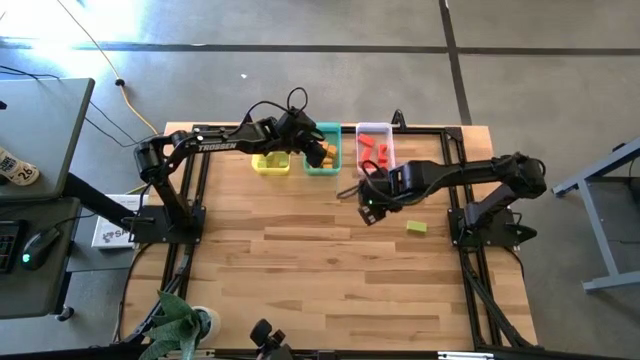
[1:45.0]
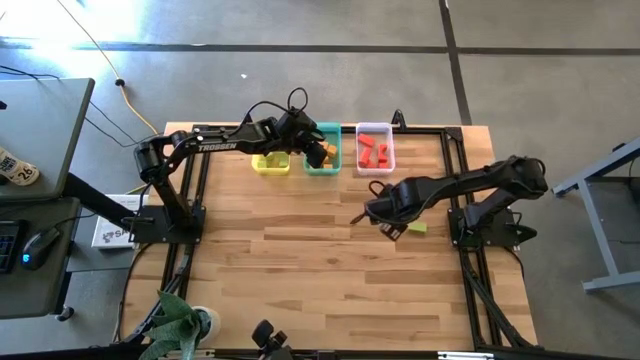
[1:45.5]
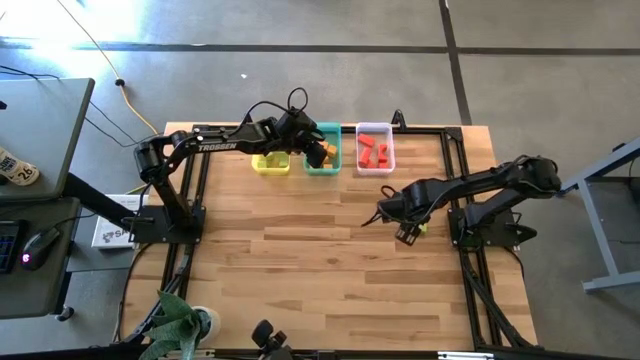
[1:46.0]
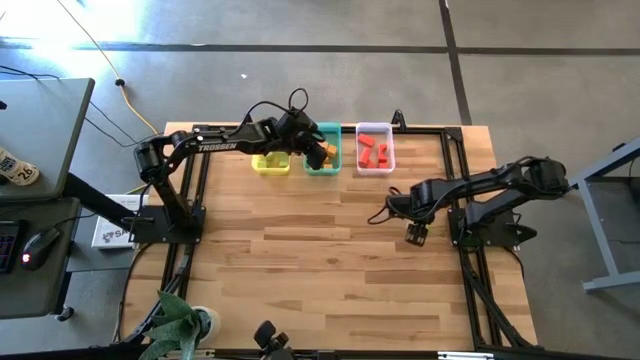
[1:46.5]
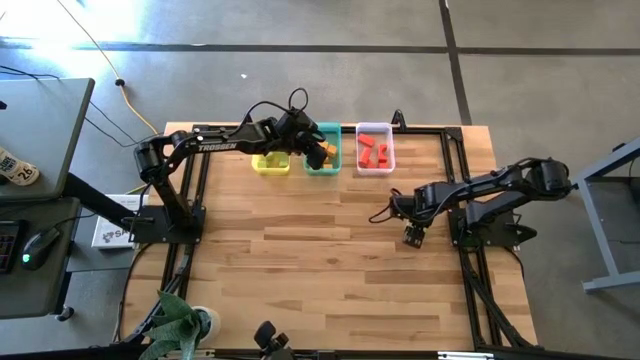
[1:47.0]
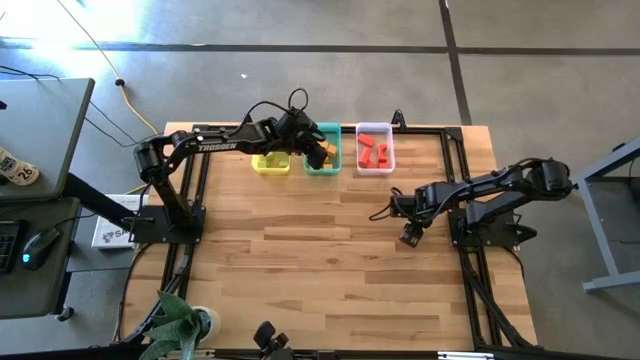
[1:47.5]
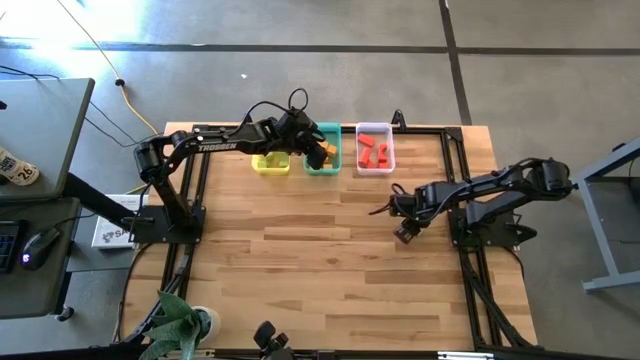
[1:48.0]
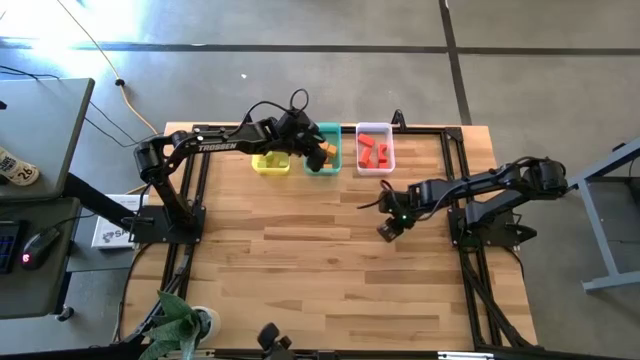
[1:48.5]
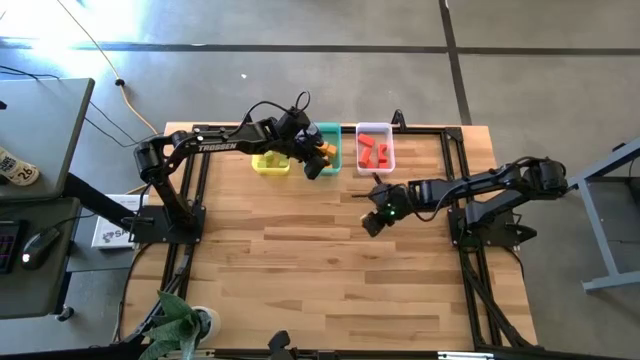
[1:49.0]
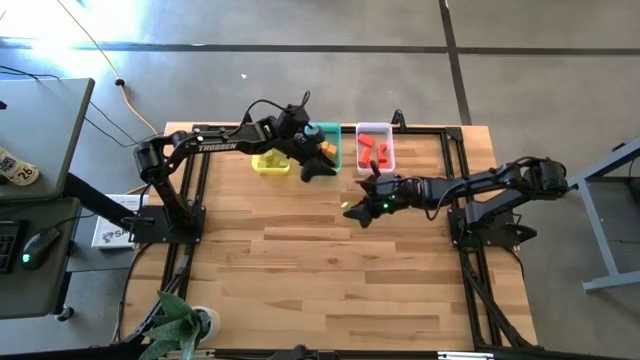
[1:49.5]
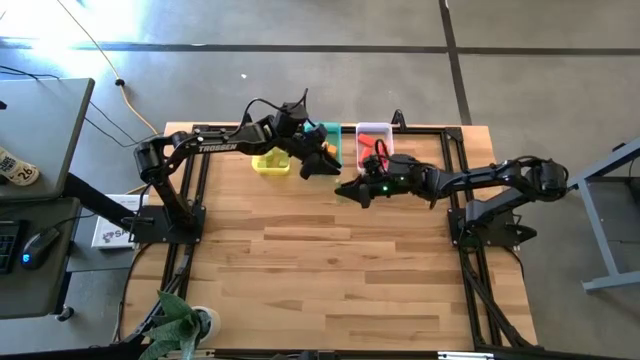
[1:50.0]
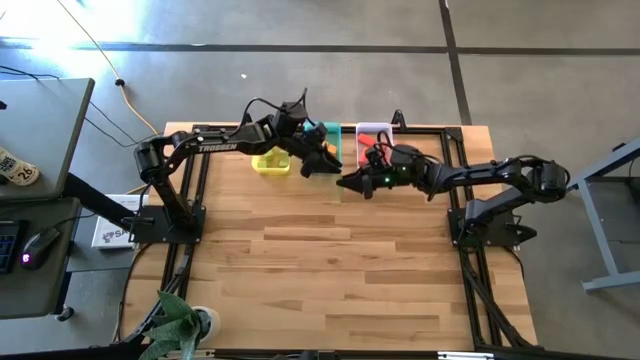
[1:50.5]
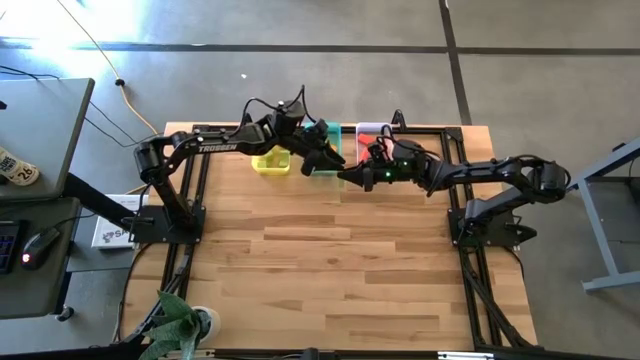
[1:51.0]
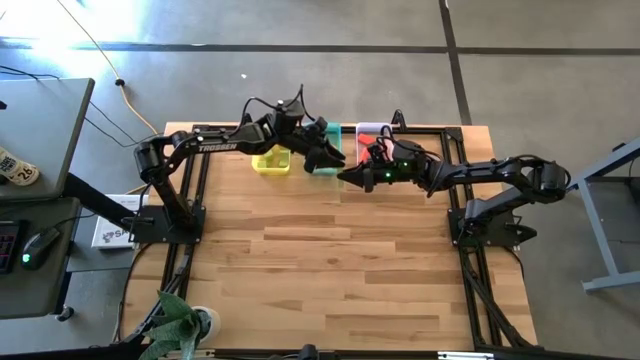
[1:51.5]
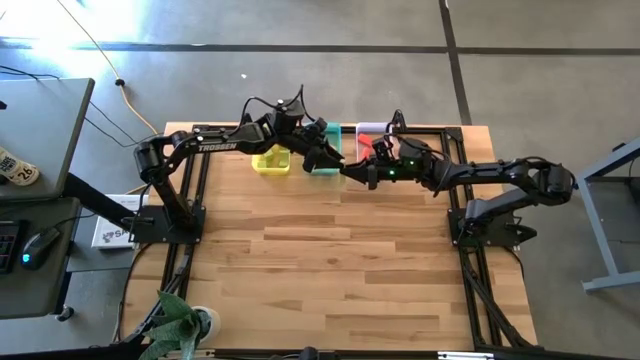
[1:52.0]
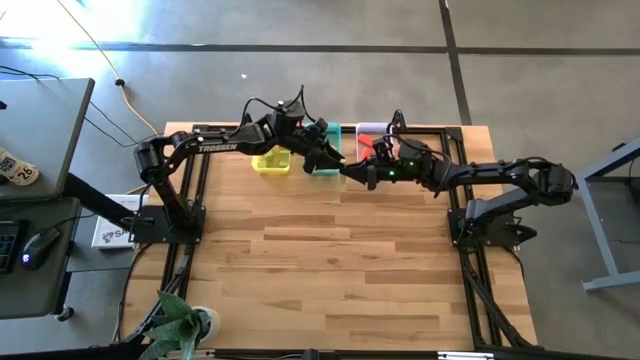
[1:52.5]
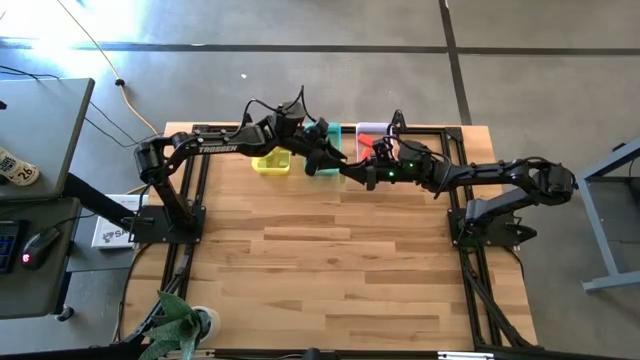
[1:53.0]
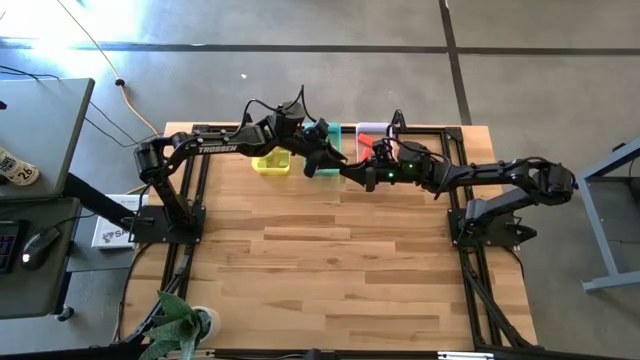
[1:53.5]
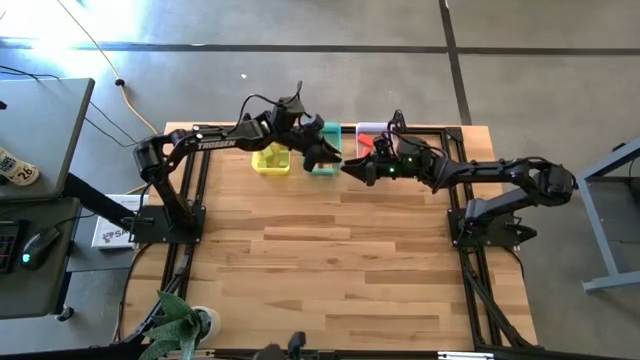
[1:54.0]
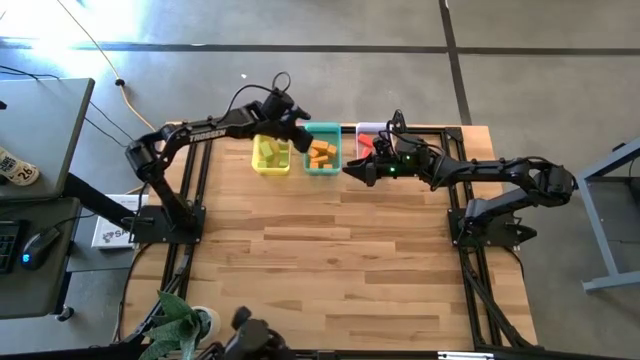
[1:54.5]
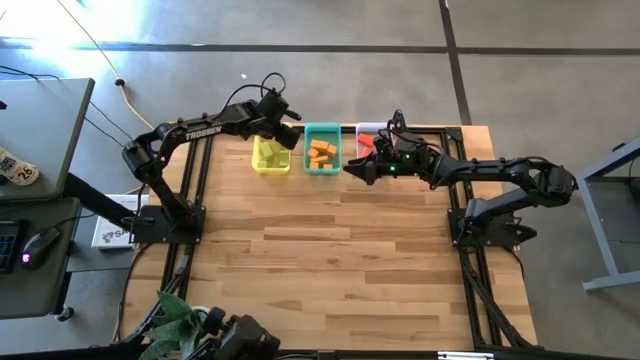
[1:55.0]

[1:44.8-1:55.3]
Task: Sort & place blocks by color
Put the green block into the yellow bin

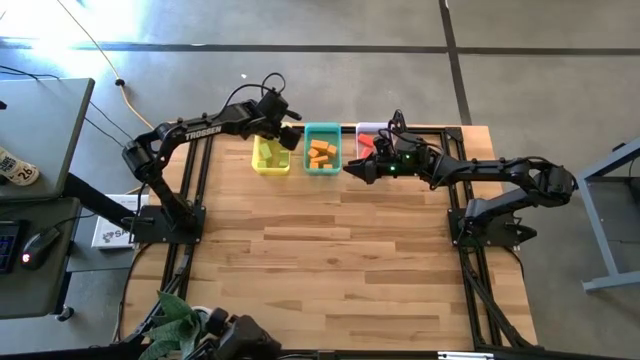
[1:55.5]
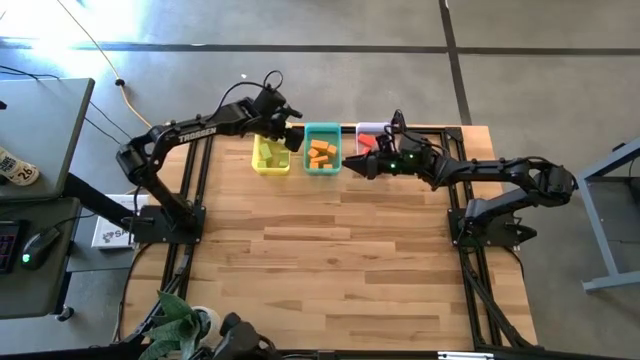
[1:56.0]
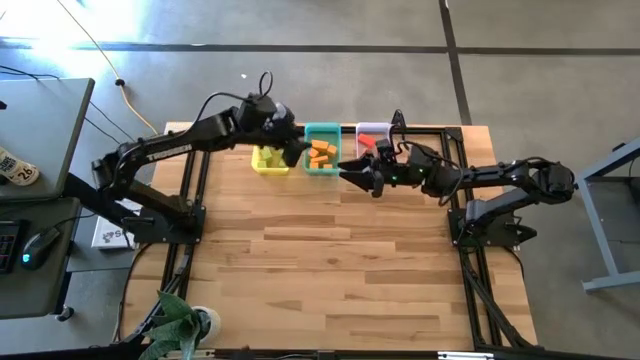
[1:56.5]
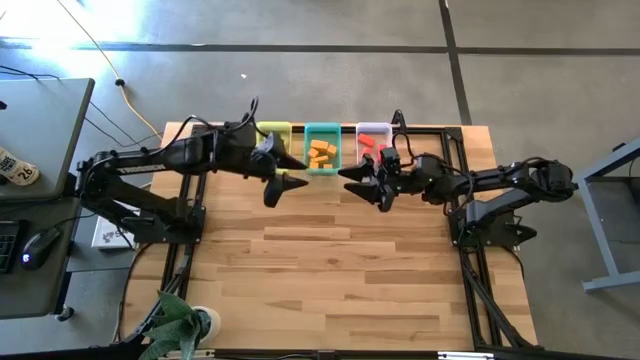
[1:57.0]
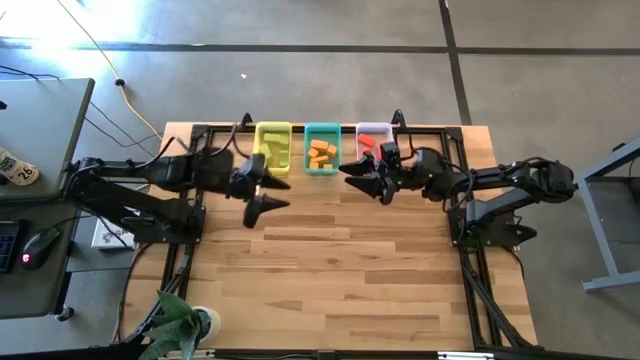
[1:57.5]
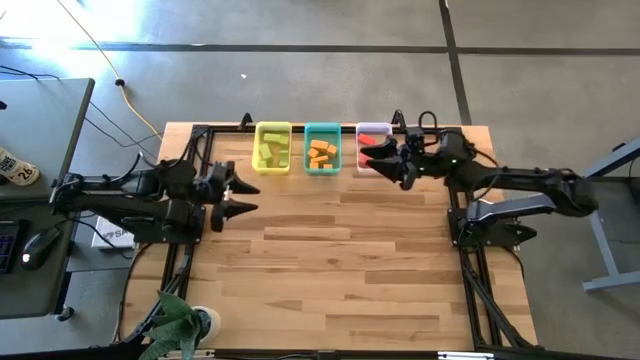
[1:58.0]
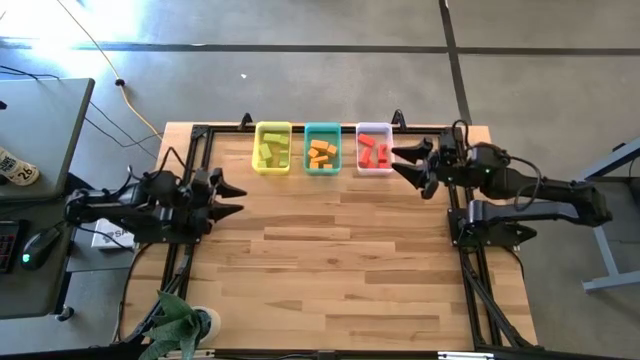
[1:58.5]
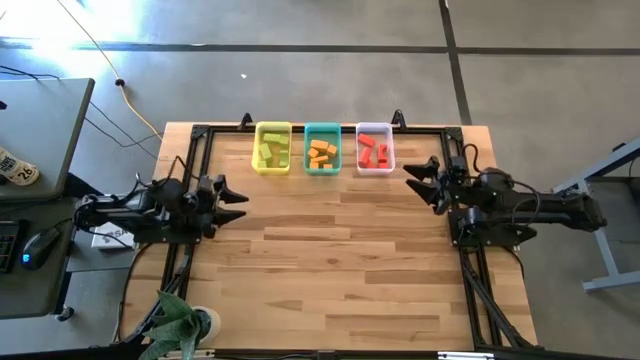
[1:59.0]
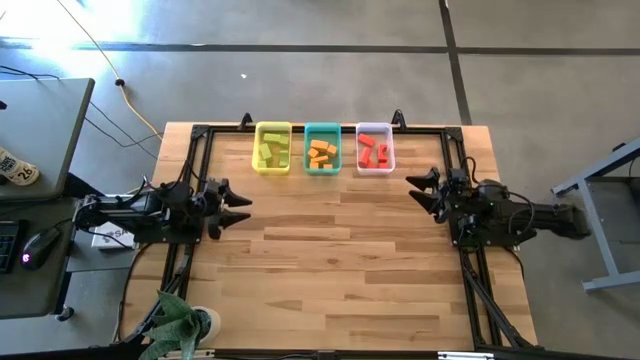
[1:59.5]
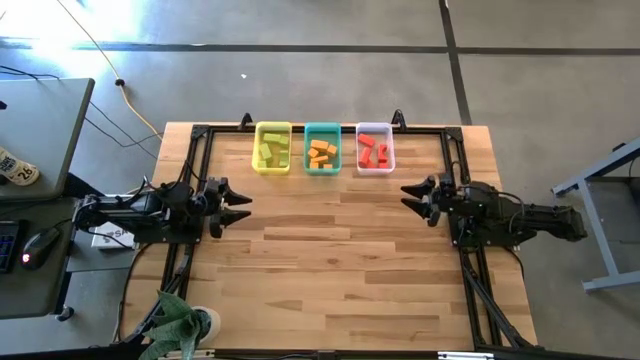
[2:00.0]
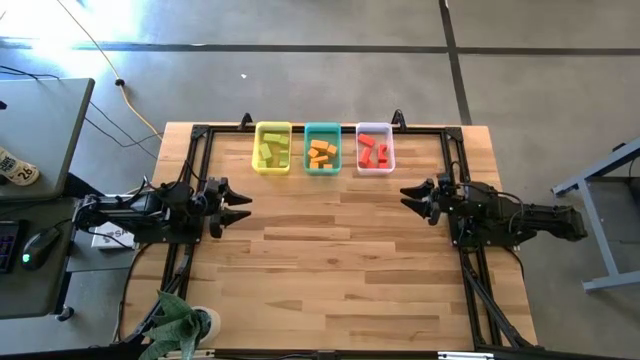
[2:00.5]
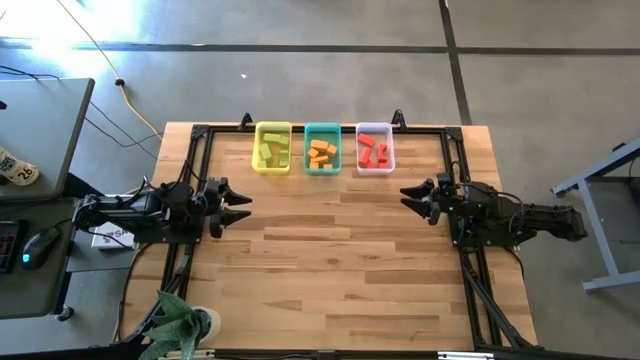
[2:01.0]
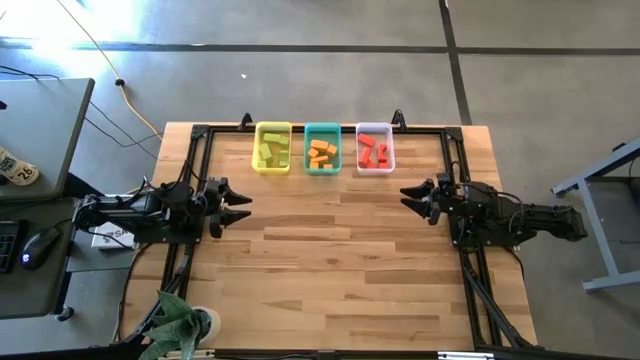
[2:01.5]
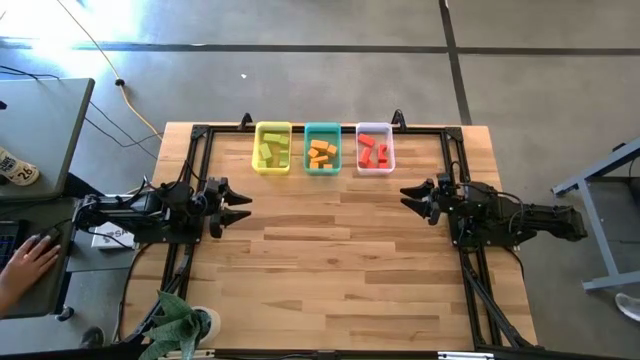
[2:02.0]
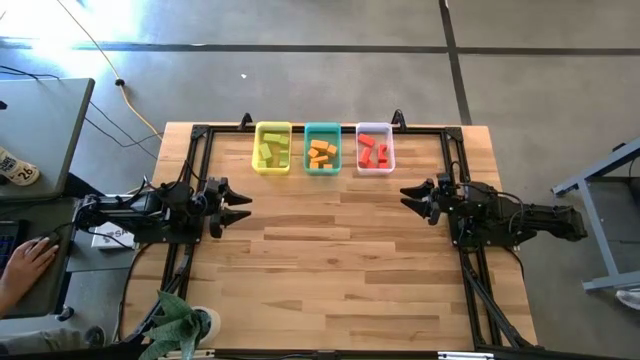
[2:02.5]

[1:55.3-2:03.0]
Return to Home Position

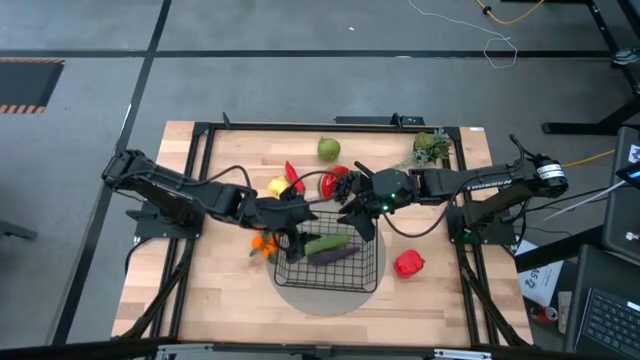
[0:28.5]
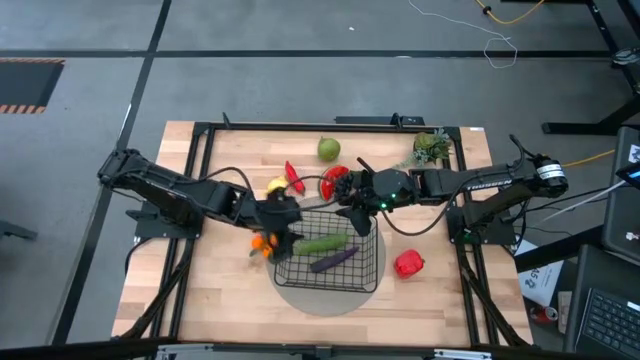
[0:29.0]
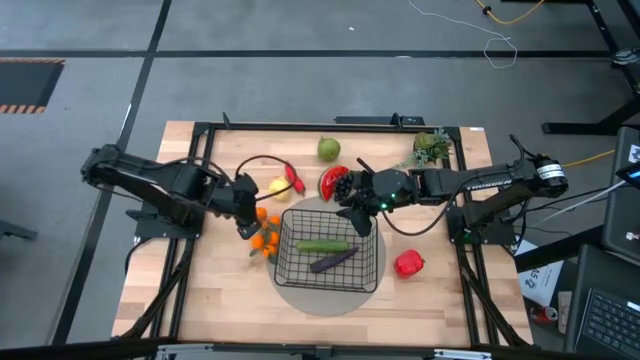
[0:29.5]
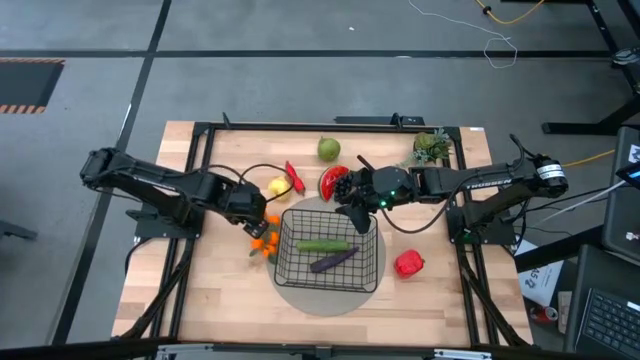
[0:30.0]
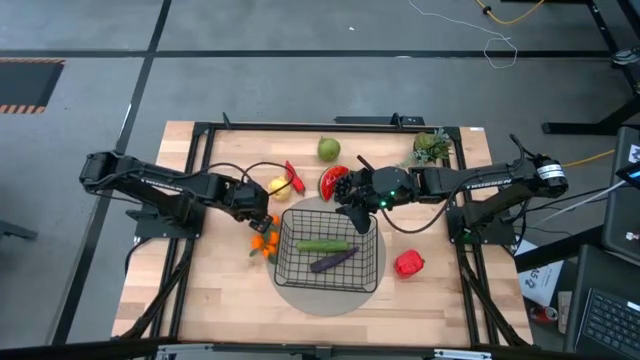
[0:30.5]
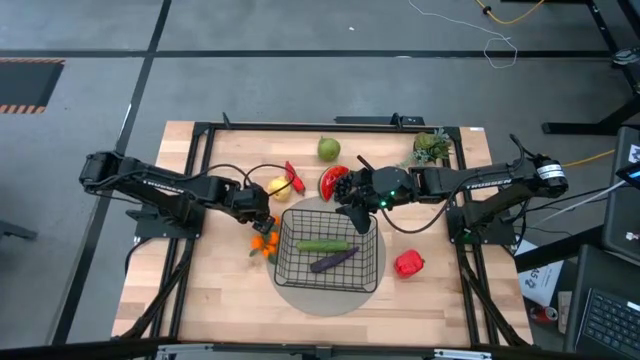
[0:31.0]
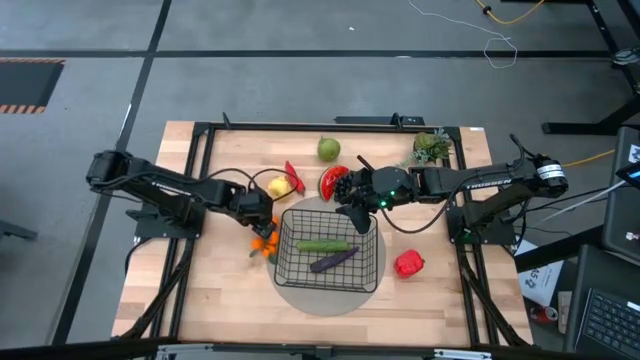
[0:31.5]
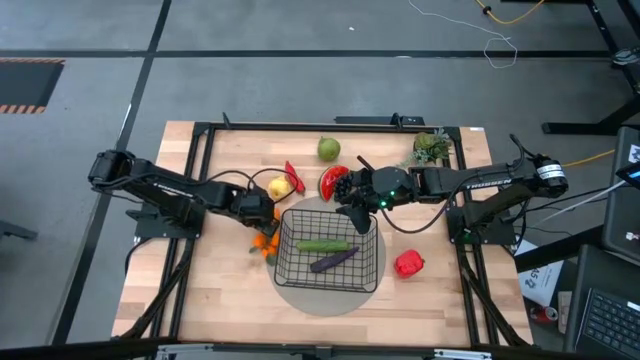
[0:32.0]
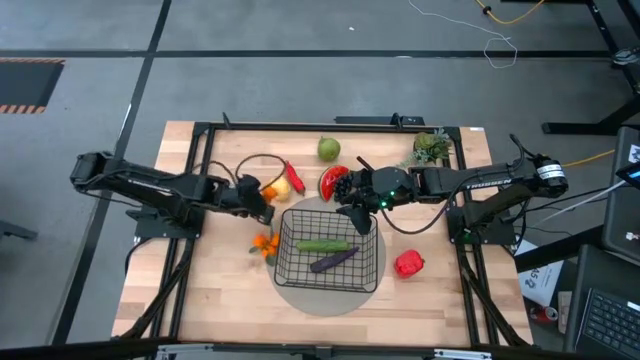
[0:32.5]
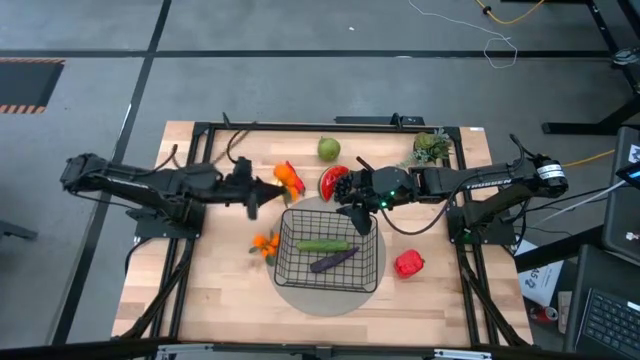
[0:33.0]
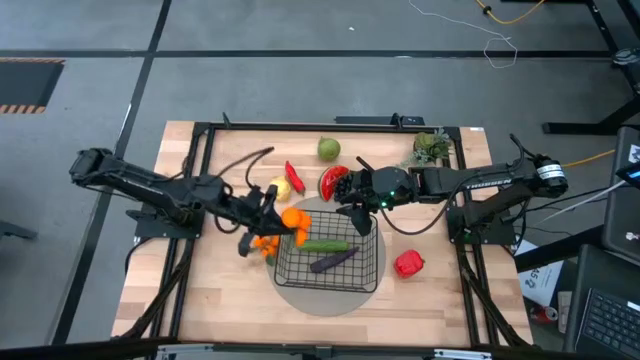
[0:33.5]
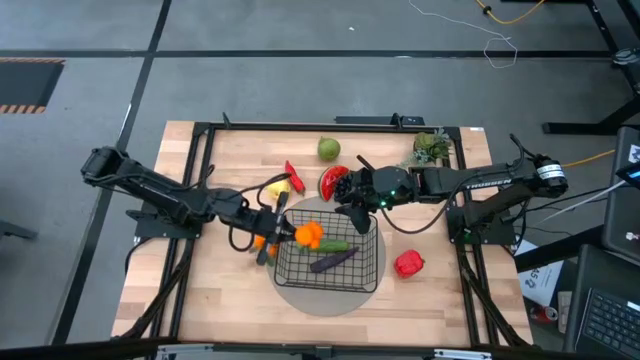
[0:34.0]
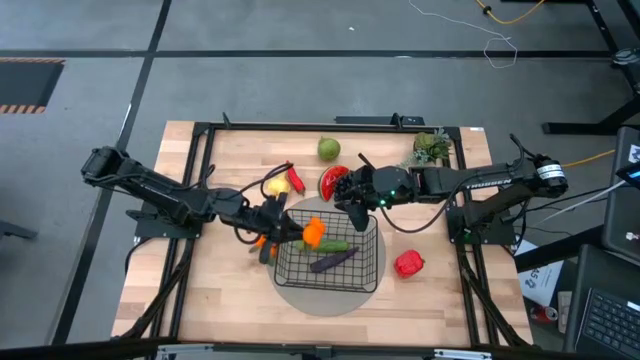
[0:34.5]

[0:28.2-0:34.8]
Task: Build produce basket
Put the top oranges tangerines into the black wire basket
